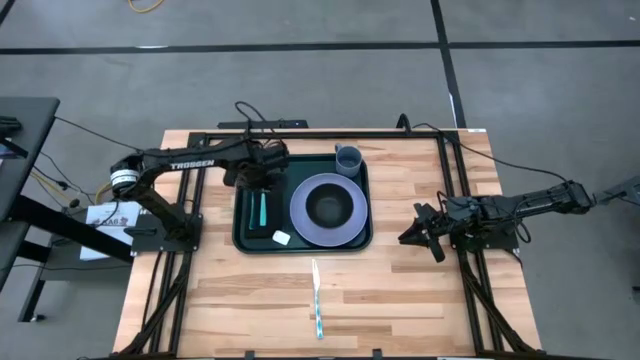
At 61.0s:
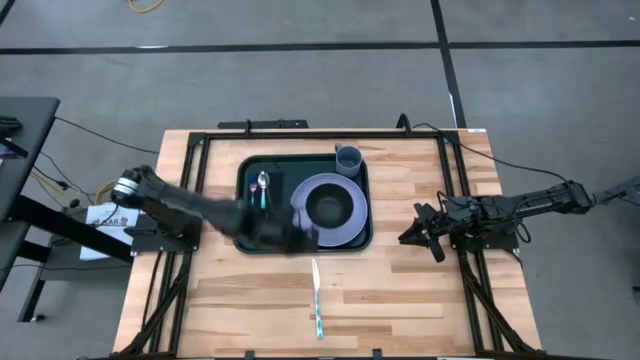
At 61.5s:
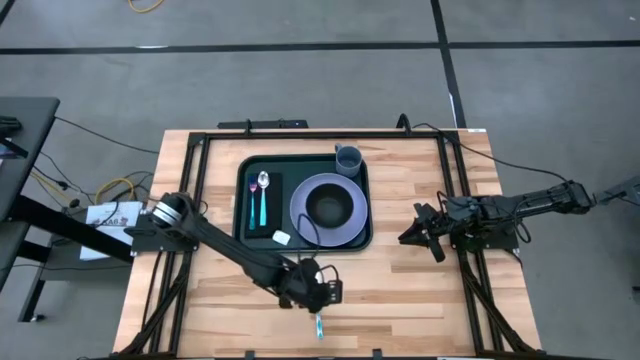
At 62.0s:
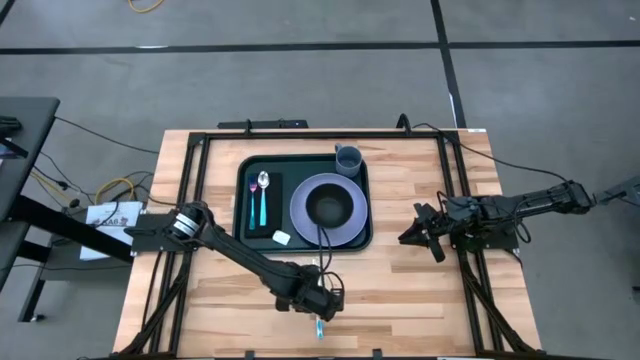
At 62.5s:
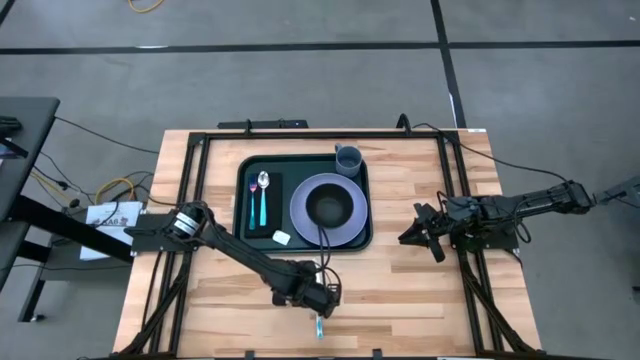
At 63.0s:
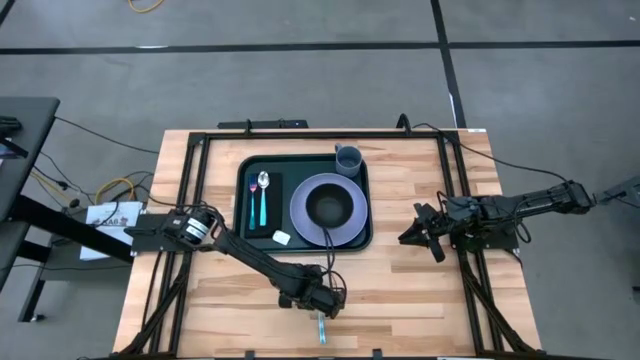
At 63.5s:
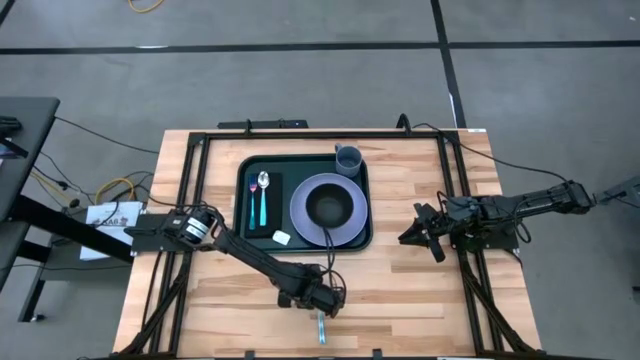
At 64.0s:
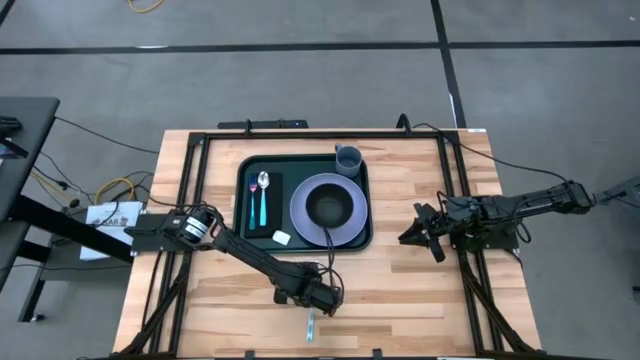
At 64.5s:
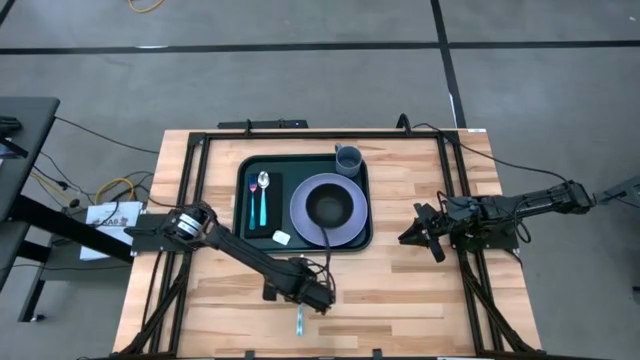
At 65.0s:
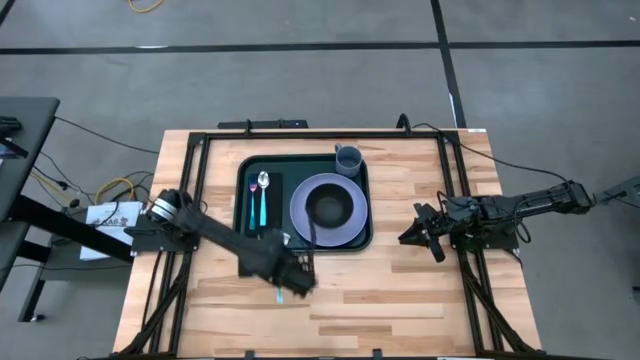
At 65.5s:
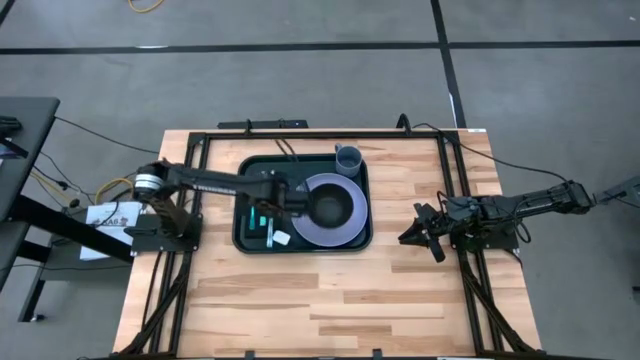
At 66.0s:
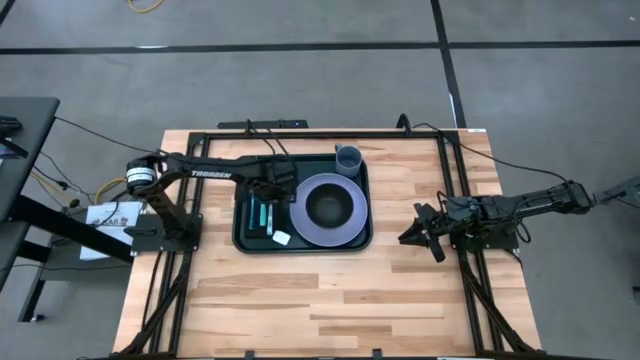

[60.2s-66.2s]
Task: Set up tray
Put the blue knife on the black napkin to the right of the blue spoon

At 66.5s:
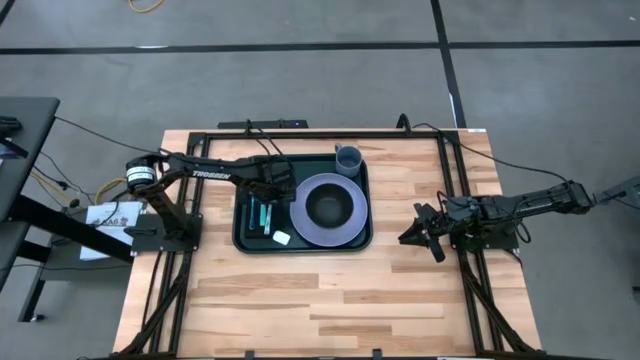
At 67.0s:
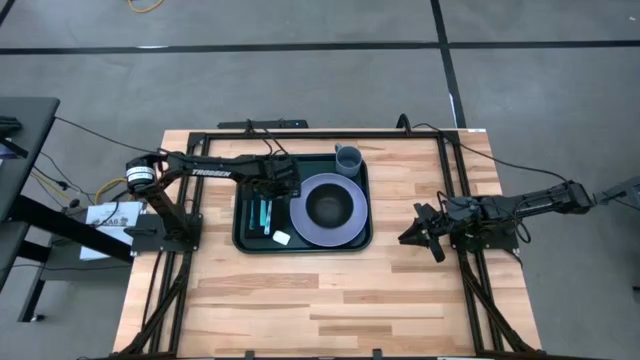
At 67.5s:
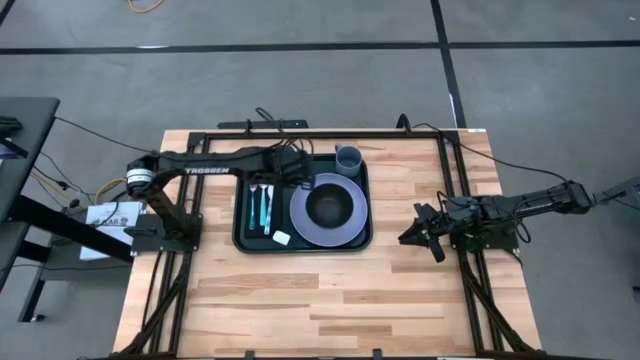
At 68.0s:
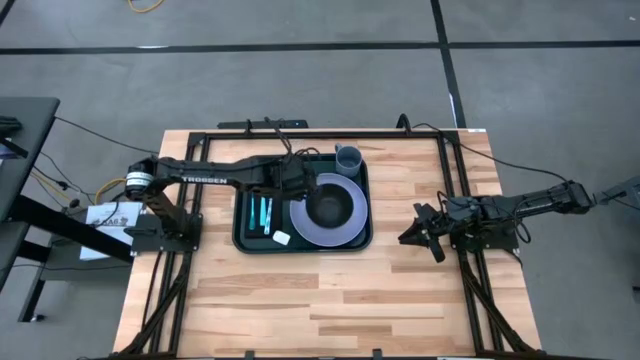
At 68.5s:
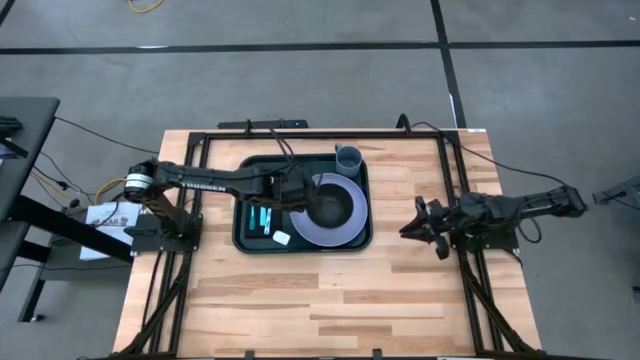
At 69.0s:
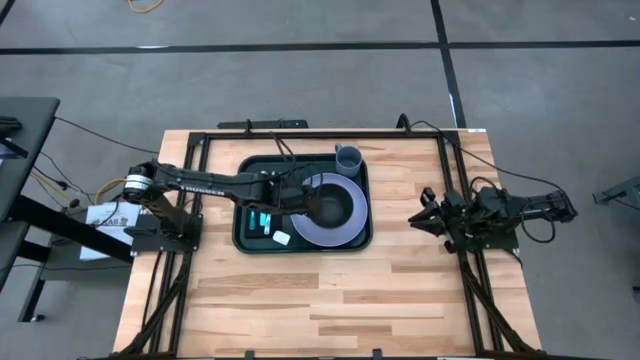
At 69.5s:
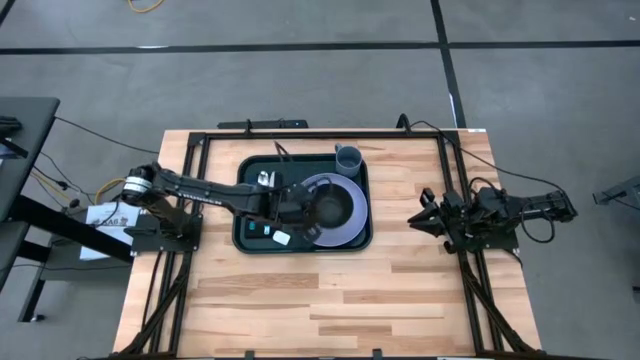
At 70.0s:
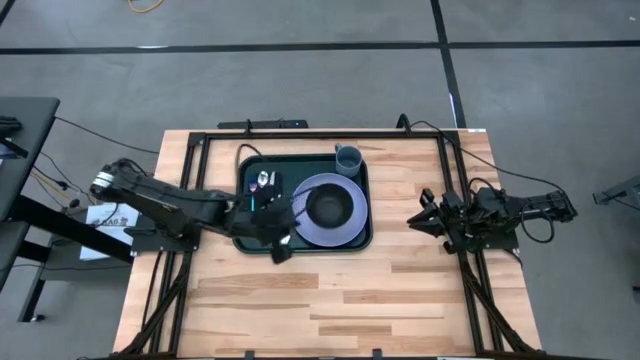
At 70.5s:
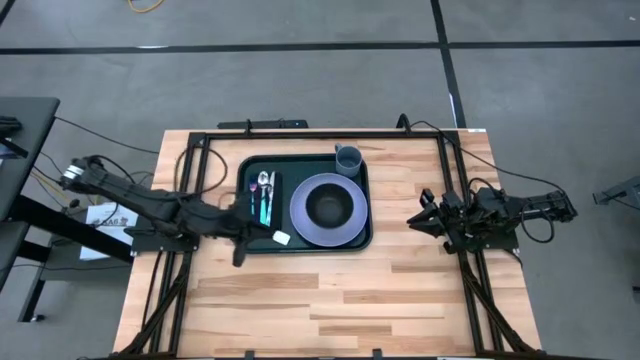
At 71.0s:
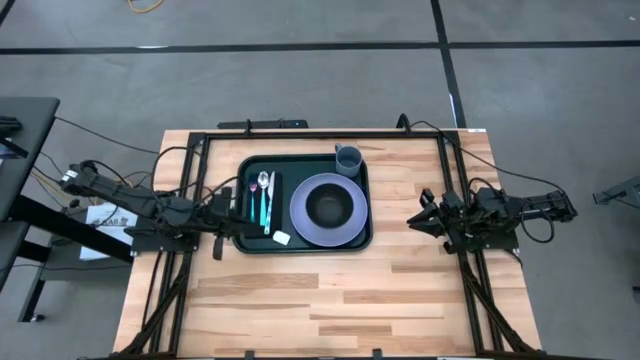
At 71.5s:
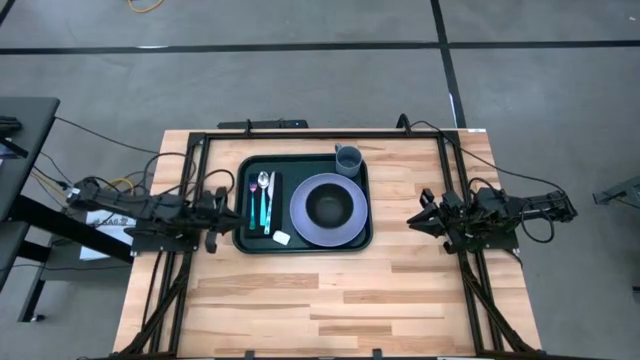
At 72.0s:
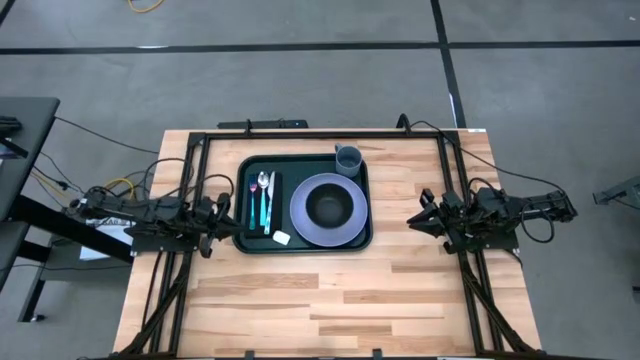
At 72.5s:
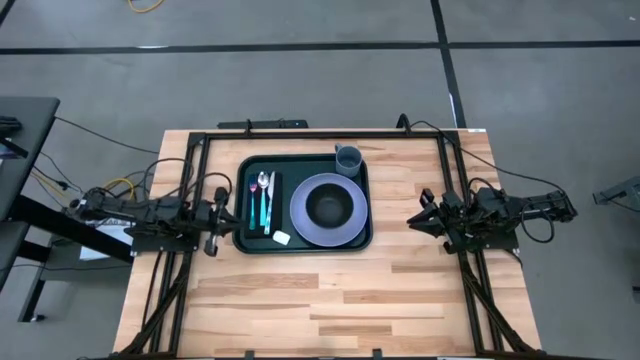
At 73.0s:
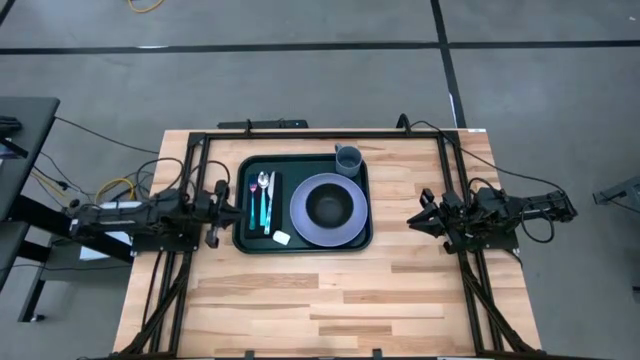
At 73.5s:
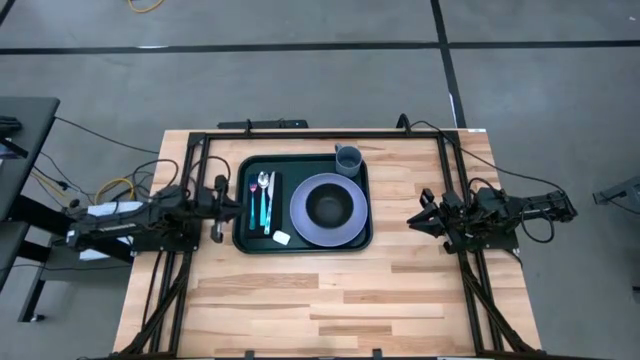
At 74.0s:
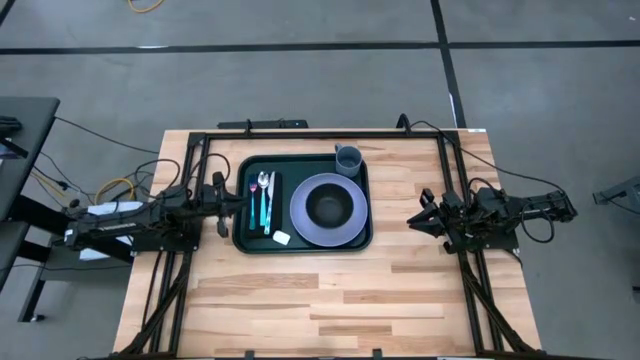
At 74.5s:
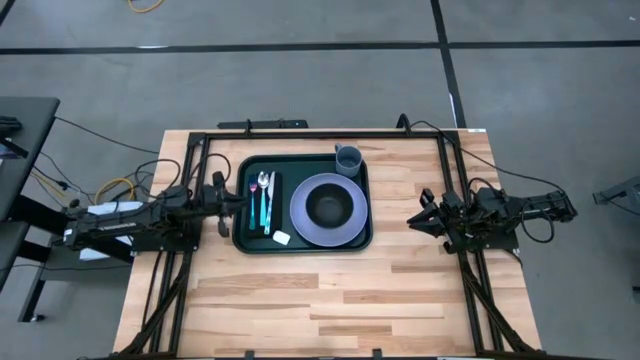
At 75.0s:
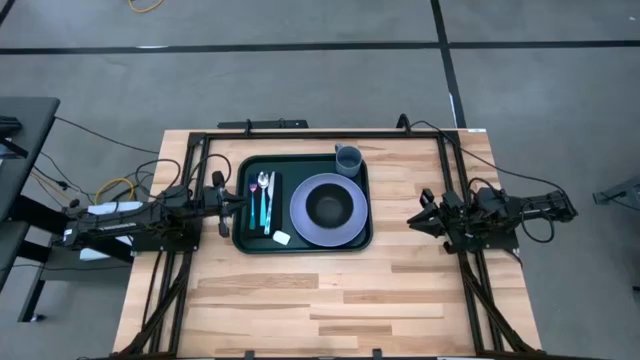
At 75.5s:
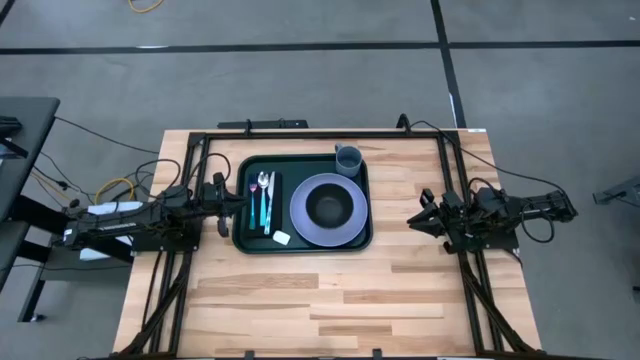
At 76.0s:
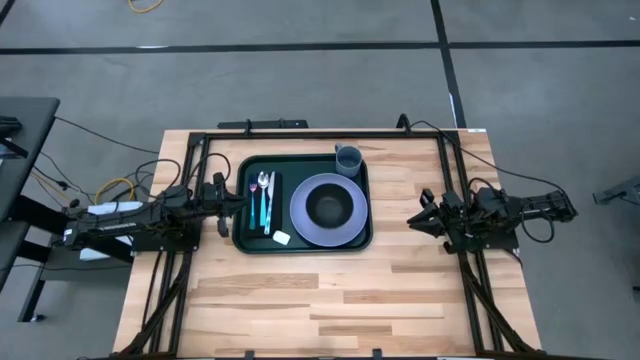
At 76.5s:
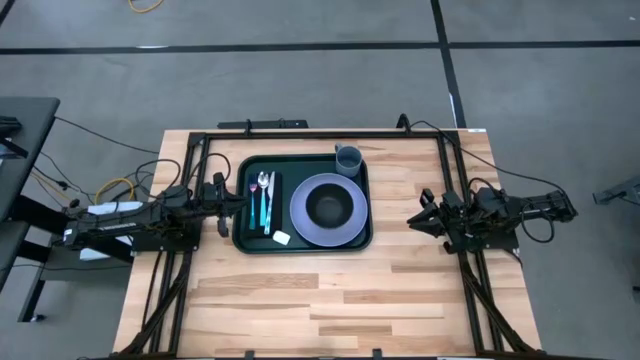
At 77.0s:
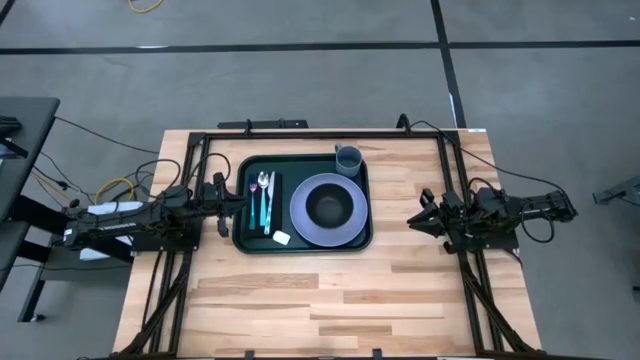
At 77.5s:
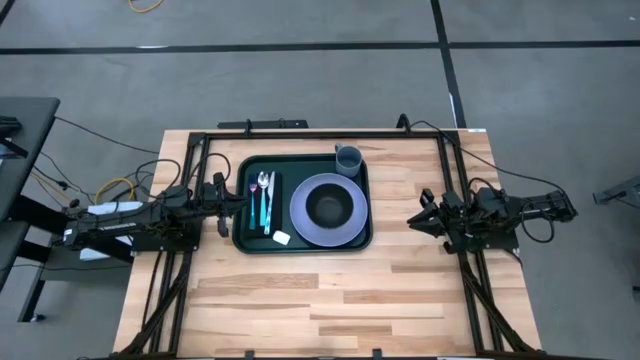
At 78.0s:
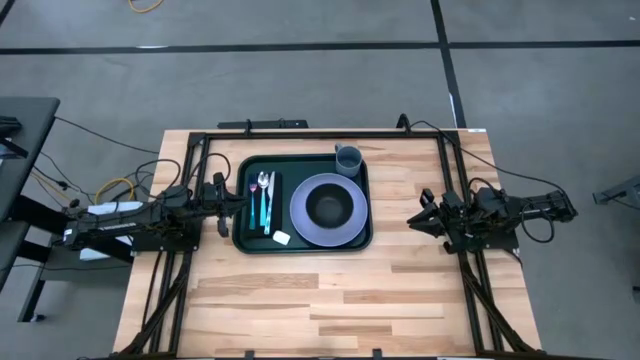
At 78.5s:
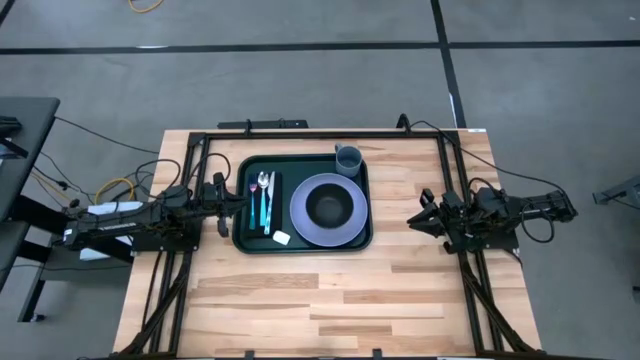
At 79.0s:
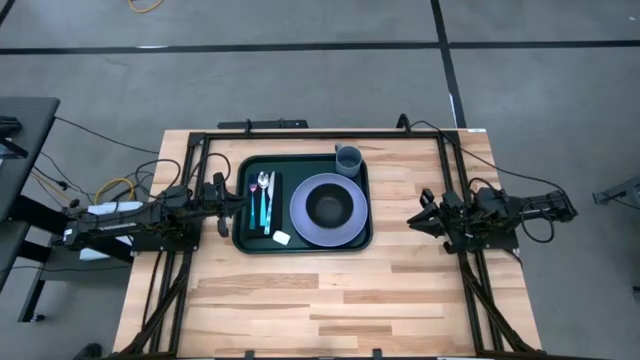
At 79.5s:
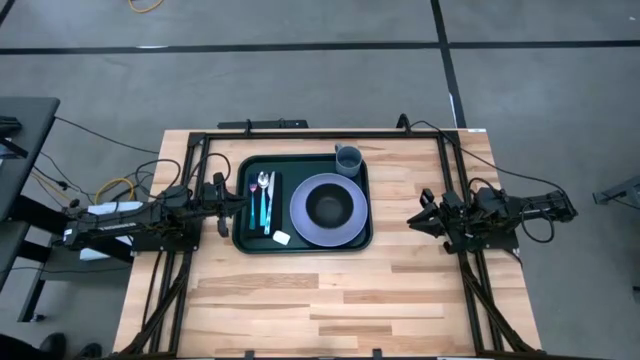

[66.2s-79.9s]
Return to Home Position

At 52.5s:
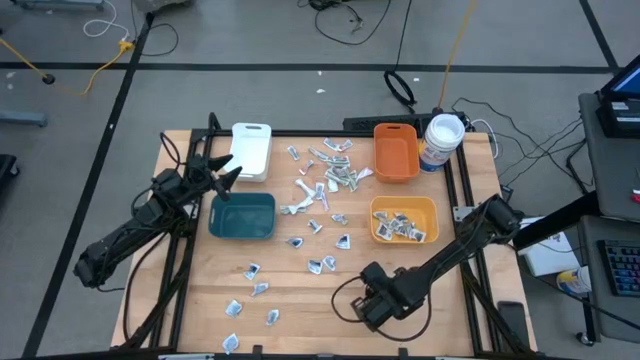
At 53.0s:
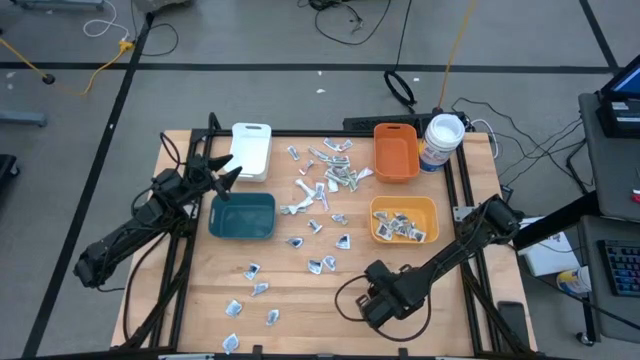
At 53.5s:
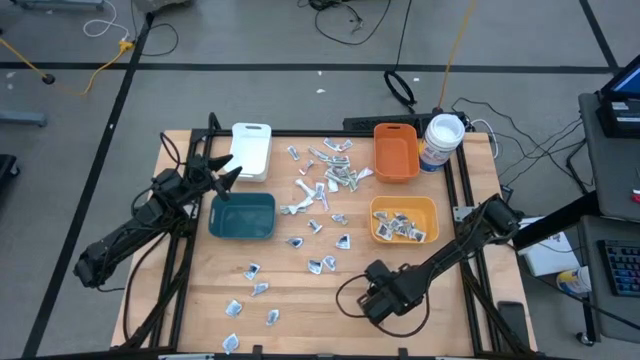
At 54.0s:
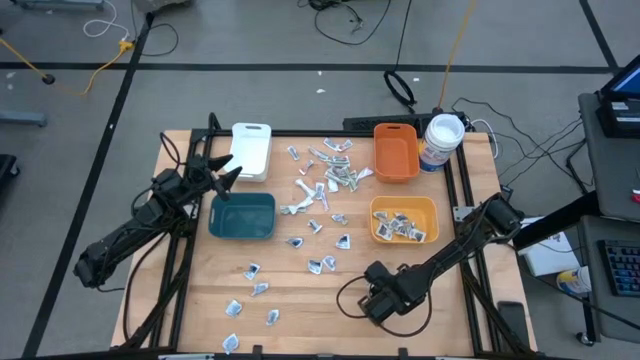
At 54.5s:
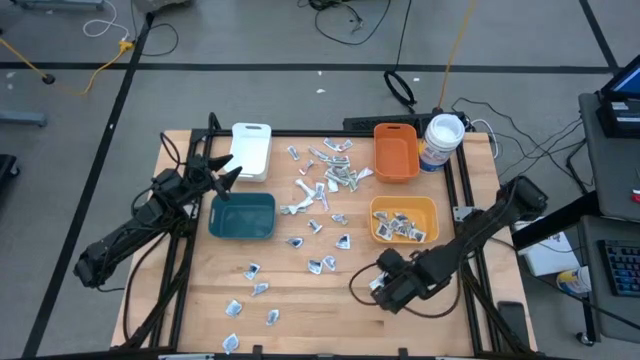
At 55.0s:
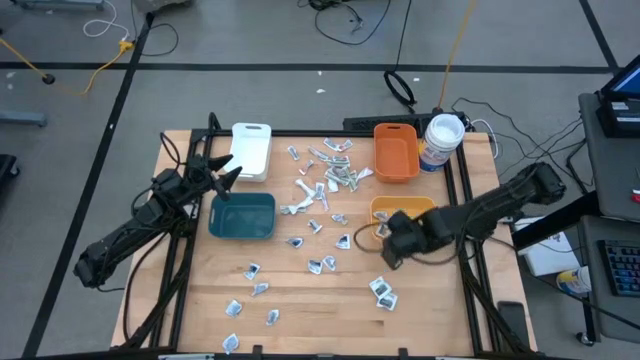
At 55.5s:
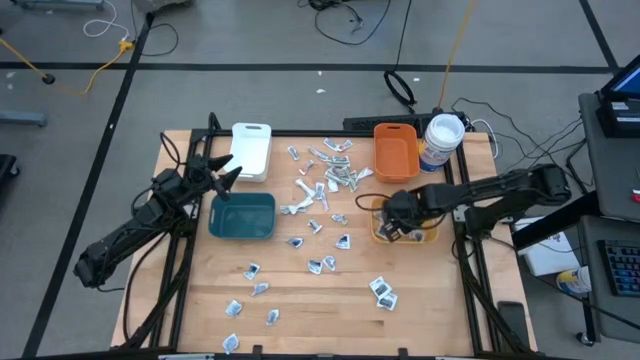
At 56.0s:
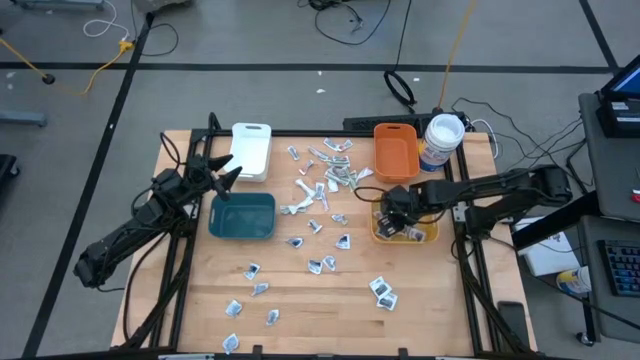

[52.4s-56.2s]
Task: Pick & Place First Aid Supplies
Put the antiseptic towelette into the yellow bin
